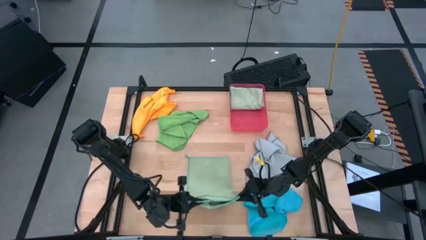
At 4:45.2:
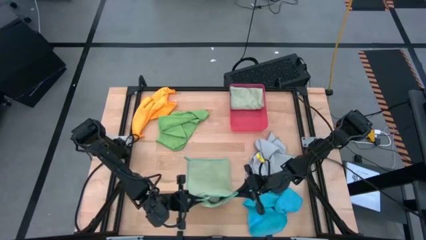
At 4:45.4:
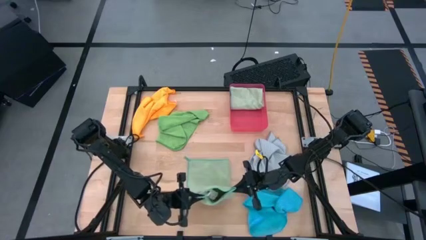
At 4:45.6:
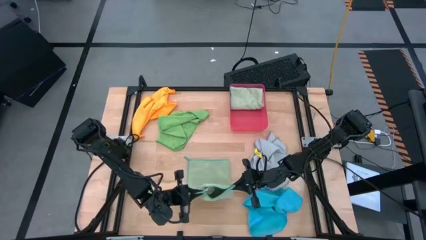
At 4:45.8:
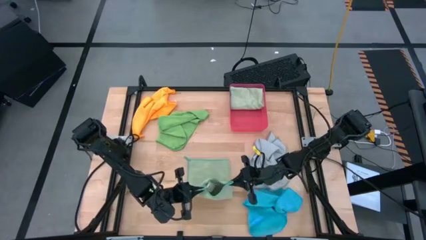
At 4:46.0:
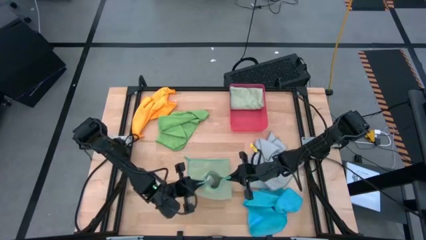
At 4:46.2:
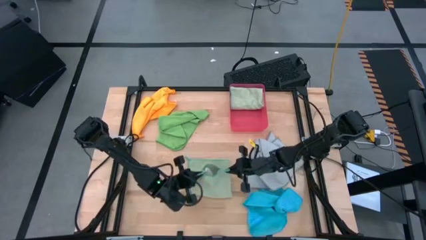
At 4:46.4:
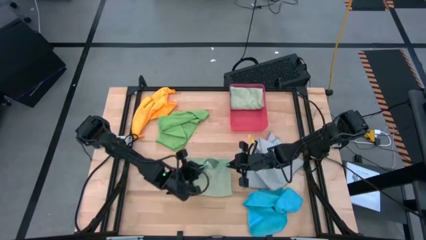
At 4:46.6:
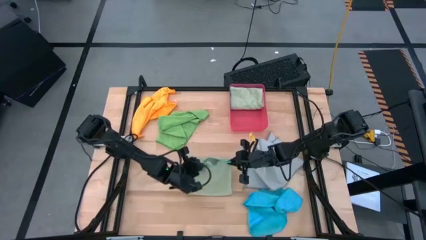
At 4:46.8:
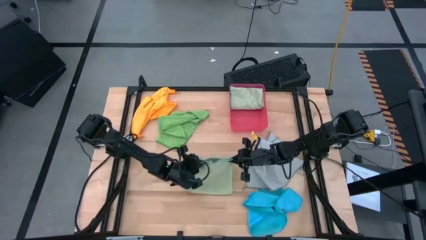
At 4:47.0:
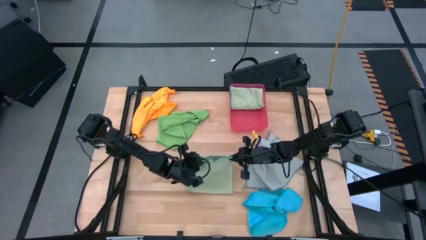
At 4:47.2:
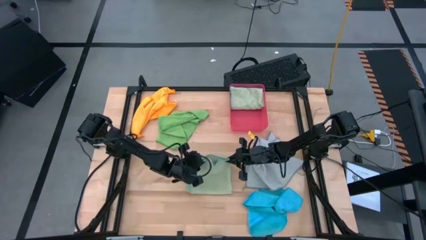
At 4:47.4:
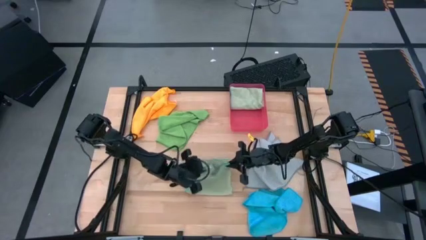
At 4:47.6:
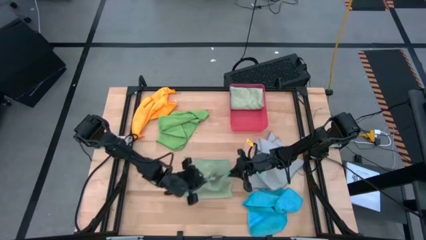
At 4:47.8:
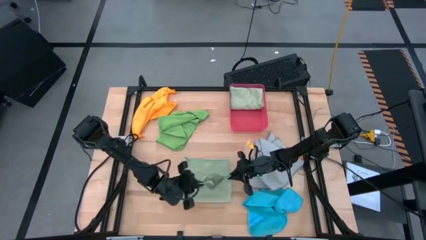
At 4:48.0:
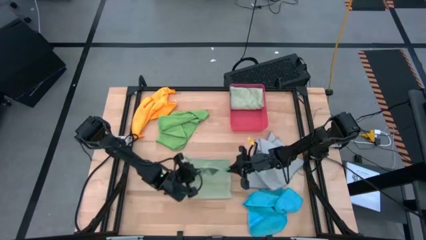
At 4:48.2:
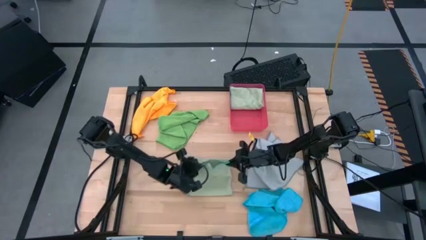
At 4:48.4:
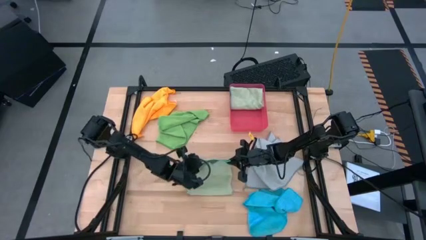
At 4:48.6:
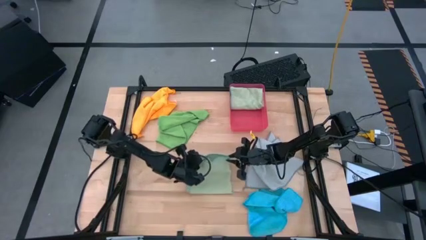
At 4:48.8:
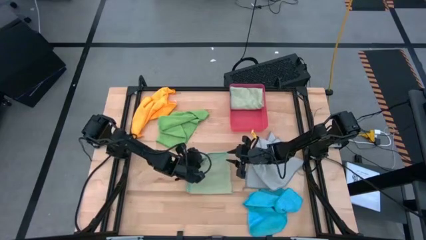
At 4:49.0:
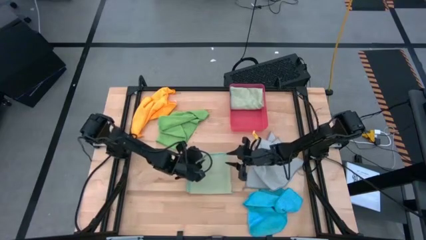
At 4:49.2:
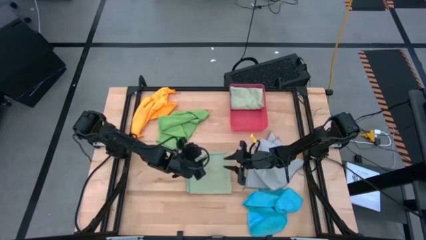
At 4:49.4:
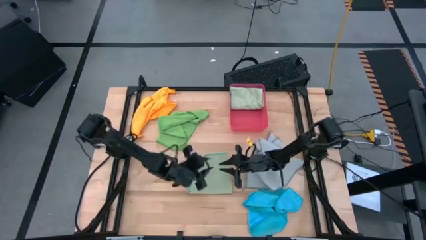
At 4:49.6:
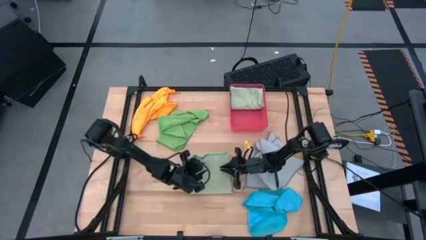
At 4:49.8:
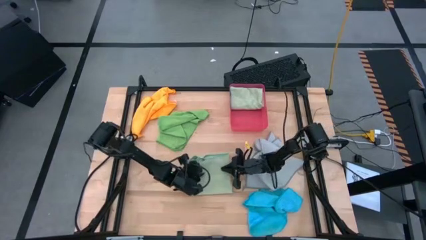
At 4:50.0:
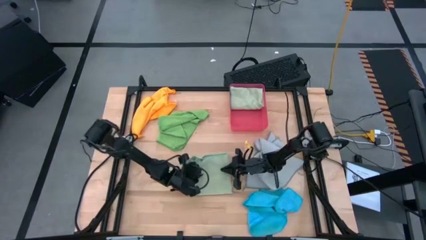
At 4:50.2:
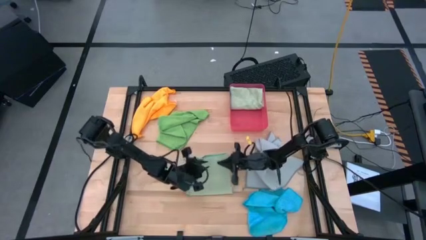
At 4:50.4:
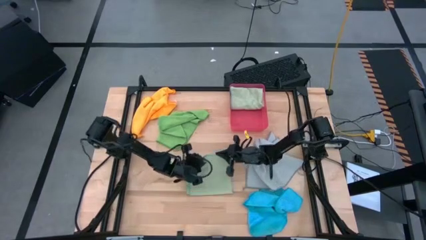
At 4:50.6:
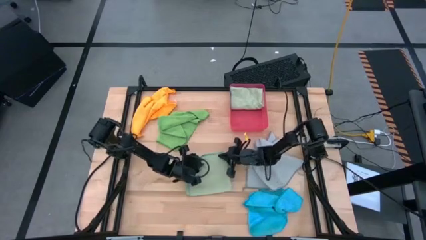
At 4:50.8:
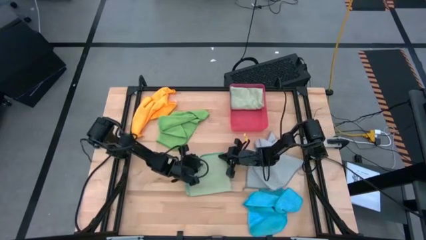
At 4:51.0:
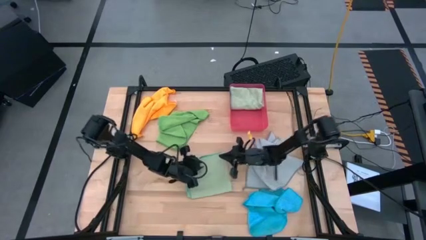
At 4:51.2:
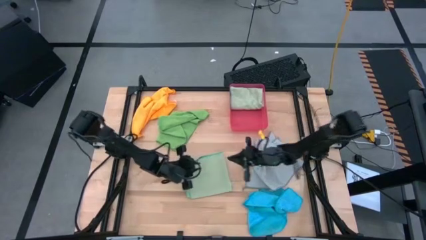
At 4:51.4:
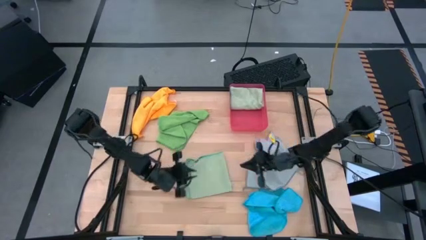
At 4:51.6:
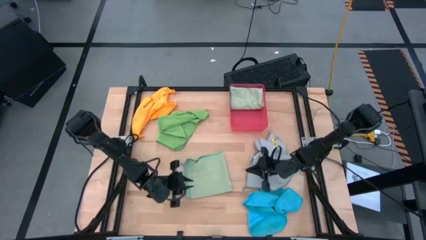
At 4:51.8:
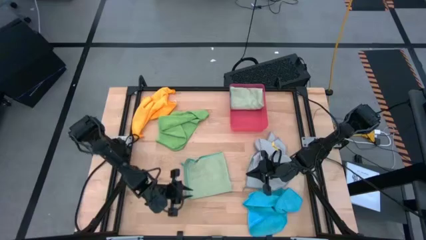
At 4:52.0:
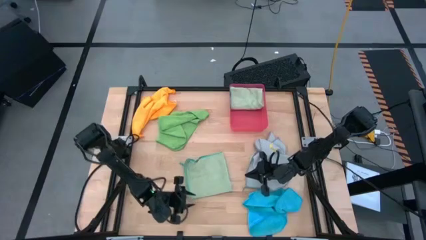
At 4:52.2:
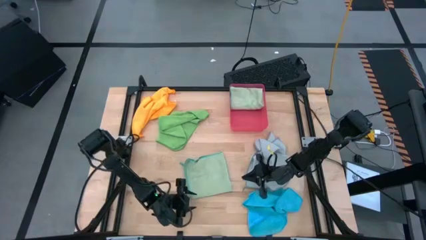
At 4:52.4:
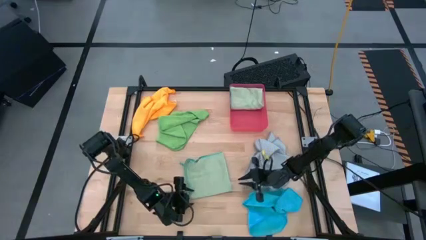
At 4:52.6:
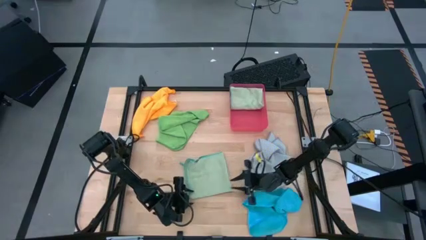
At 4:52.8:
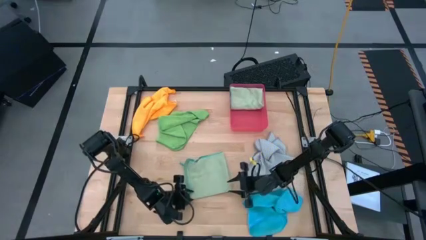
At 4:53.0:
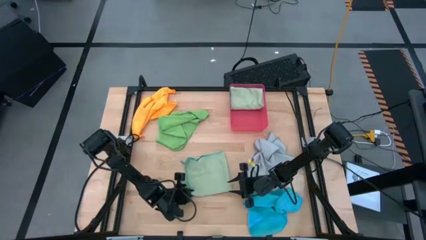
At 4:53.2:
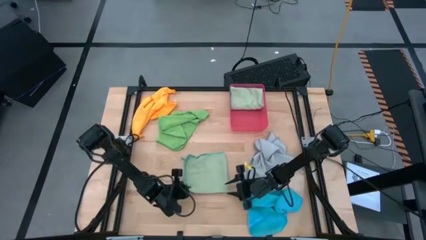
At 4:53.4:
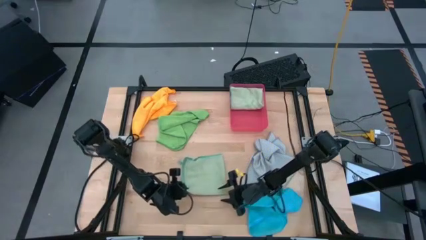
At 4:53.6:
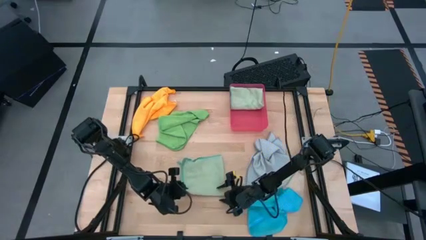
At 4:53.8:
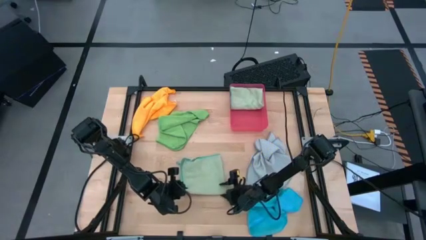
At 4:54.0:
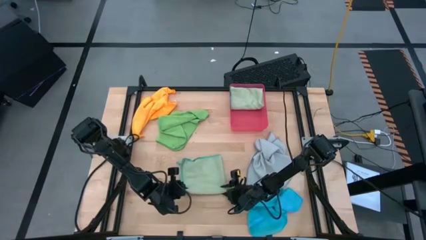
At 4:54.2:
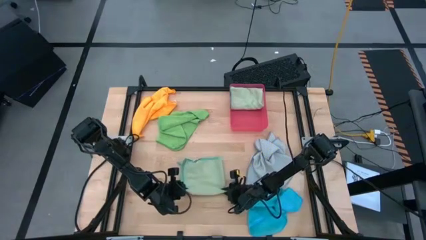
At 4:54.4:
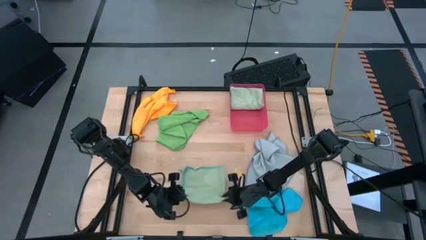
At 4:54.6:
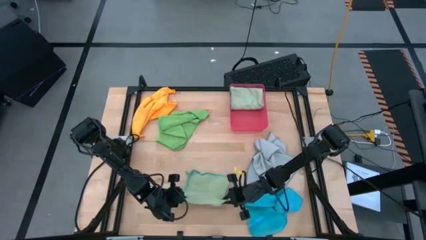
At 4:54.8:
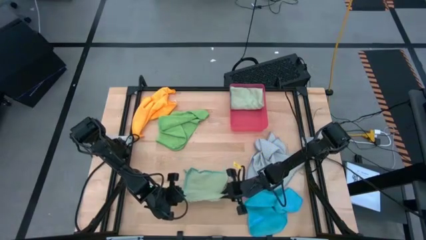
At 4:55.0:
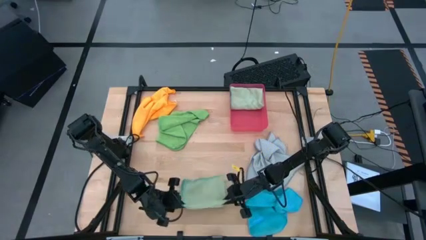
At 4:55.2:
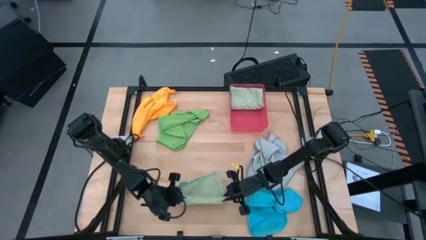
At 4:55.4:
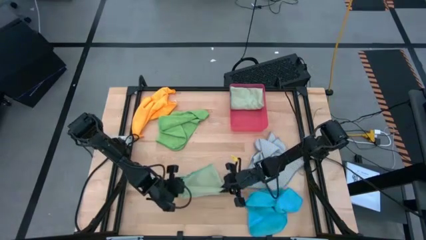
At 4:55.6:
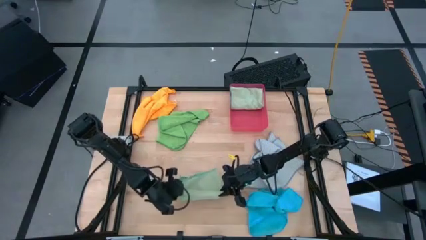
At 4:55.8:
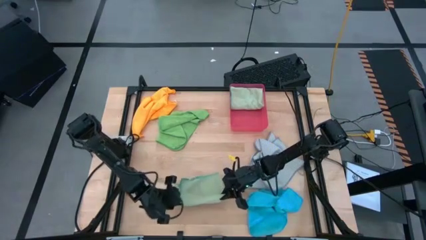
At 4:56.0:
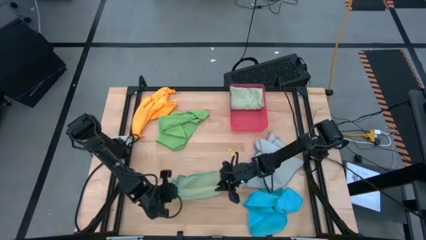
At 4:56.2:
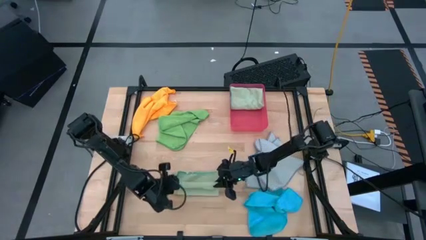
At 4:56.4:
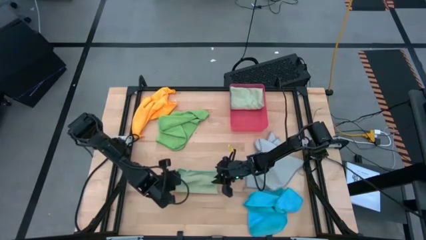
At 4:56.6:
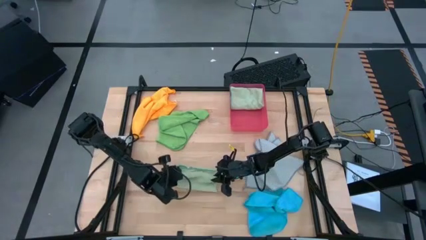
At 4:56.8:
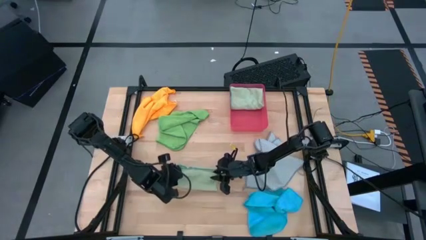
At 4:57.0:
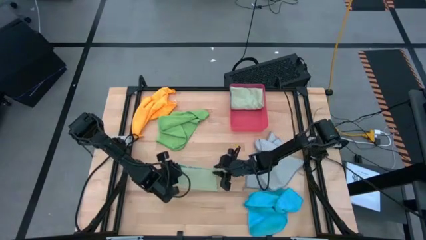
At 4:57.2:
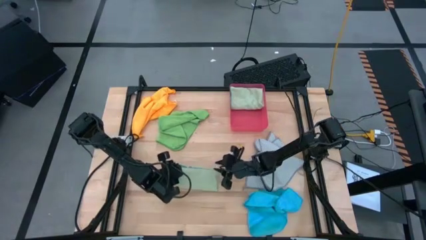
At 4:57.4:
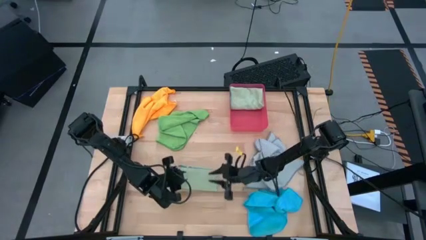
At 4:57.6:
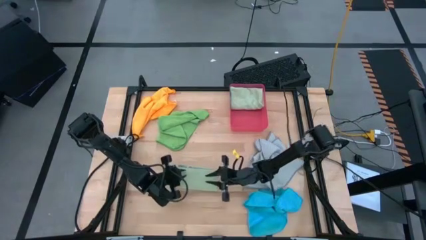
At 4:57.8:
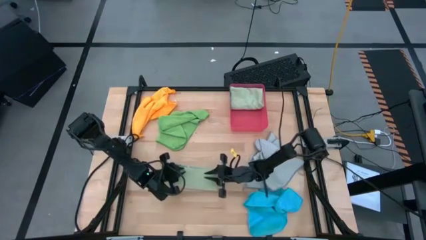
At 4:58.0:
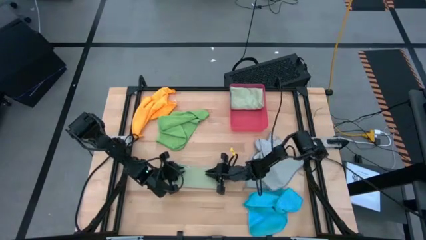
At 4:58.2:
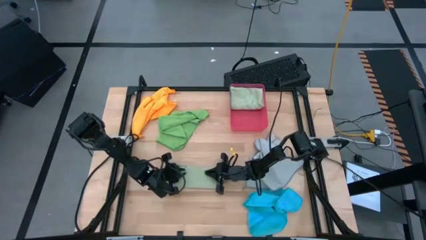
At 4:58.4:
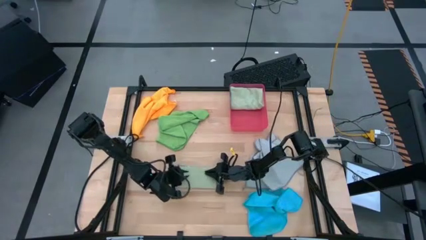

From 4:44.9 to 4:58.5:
Task: Fold microfiber towels
Fold the light green microfiber cloth

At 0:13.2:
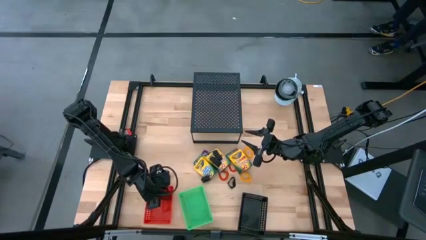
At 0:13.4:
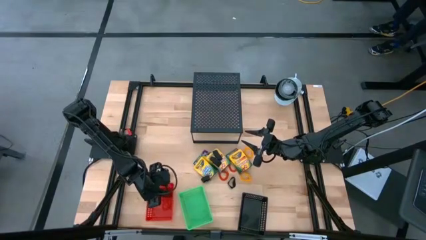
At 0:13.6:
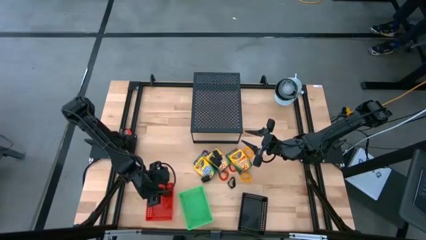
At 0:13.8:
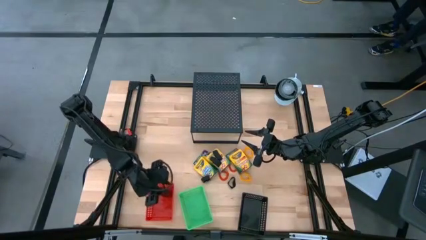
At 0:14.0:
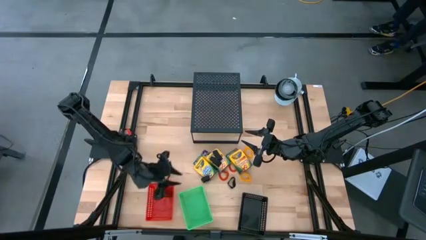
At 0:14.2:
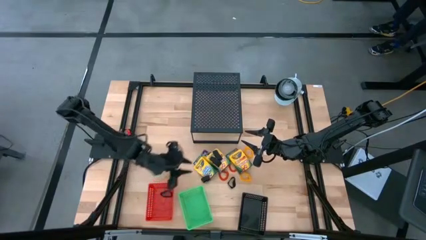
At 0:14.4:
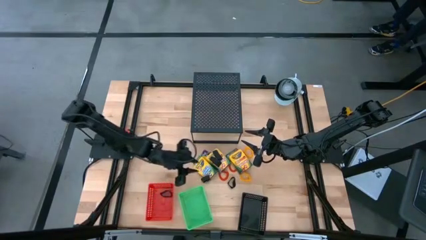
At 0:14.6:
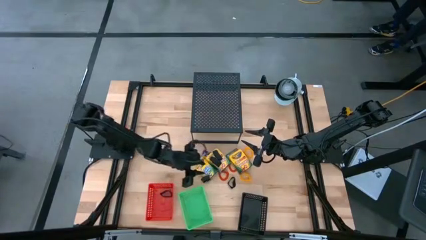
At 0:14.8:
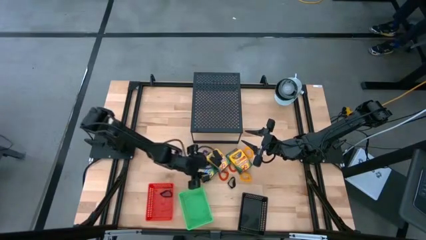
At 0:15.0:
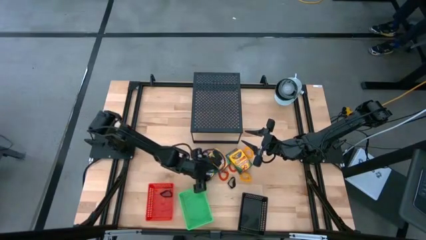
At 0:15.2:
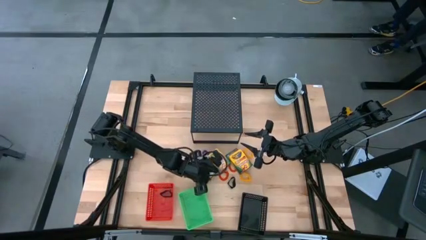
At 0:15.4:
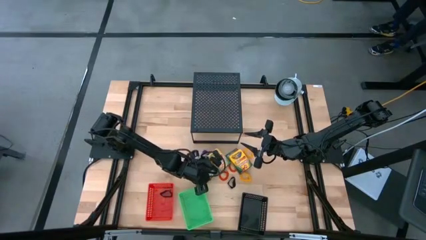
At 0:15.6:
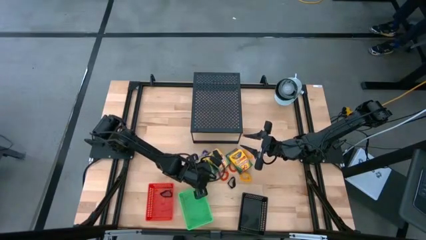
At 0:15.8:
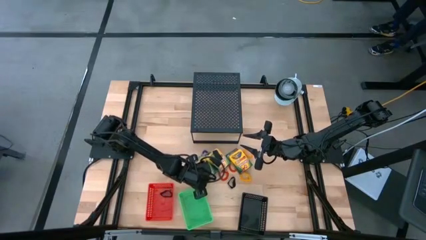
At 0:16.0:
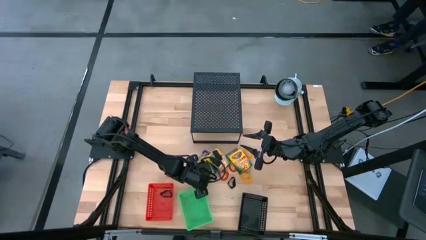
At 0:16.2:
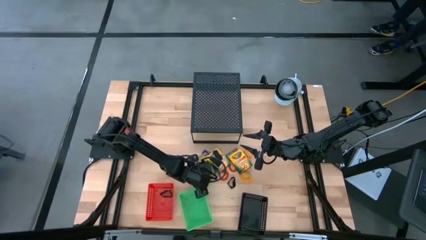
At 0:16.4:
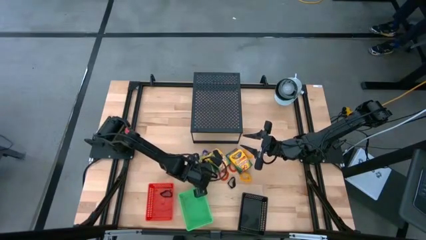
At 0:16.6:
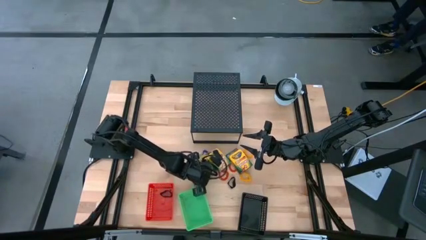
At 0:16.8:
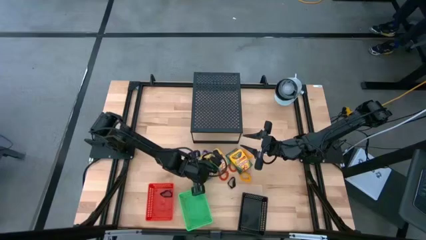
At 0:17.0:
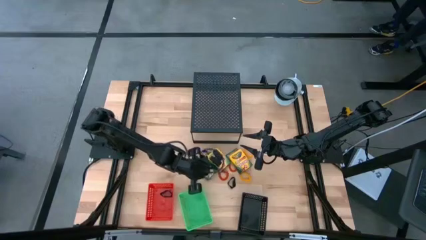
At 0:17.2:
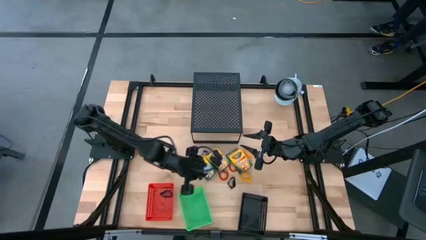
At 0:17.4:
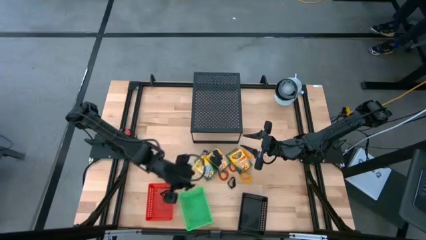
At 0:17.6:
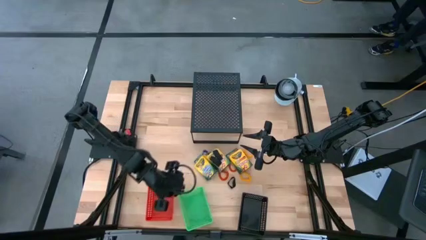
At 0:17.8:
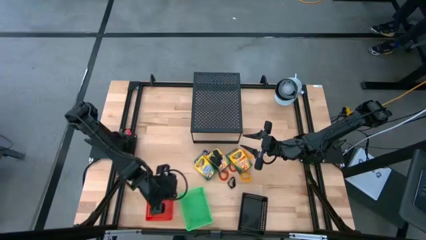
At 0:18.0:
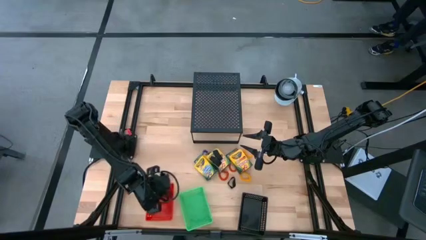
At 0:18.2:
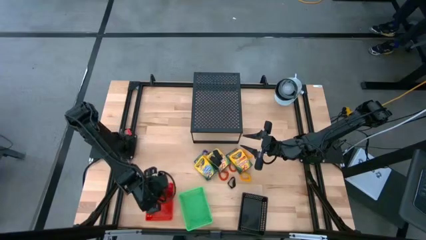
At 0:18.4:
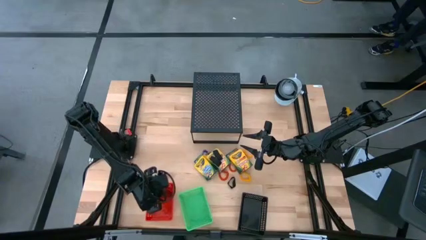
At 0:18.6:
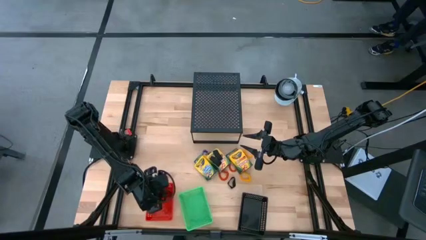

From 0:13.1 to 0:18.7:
Task: Pick & Place Office Desk Supplies
Put the black rubberband into the red bin
